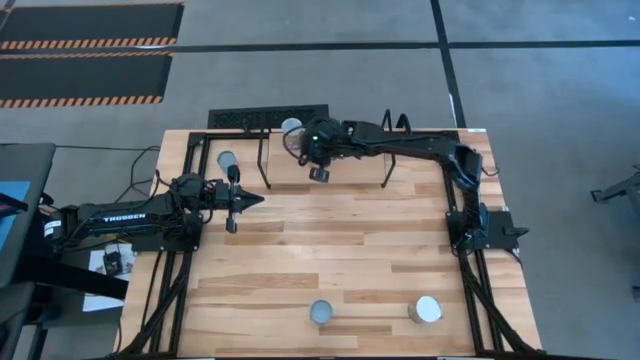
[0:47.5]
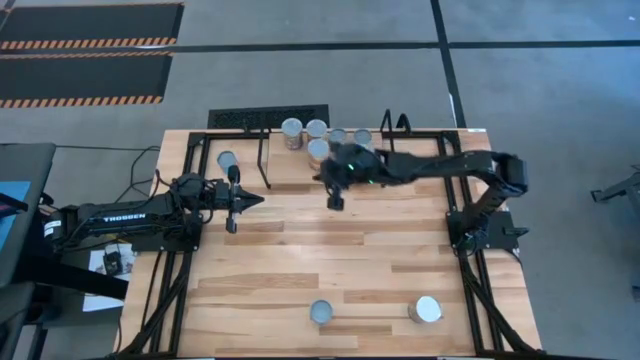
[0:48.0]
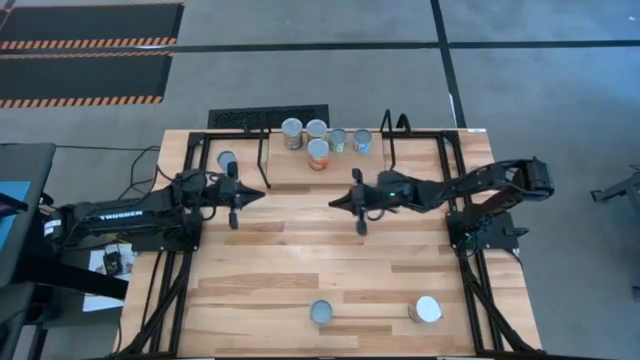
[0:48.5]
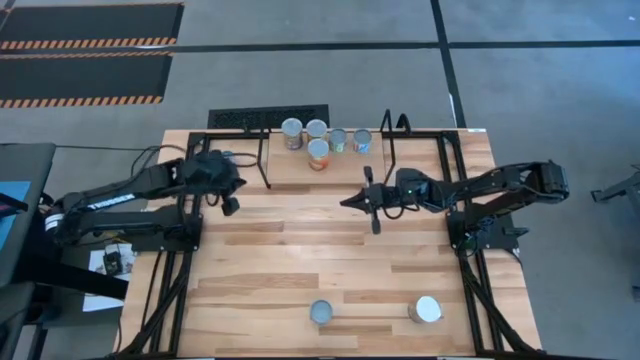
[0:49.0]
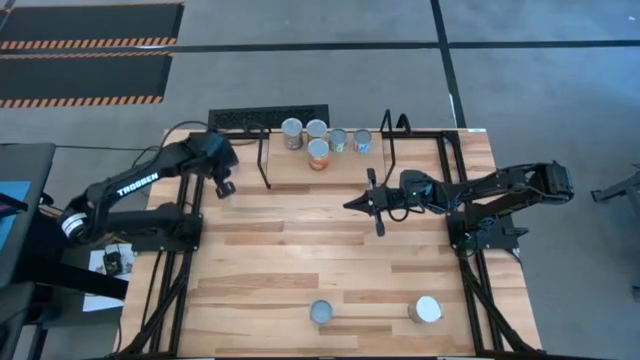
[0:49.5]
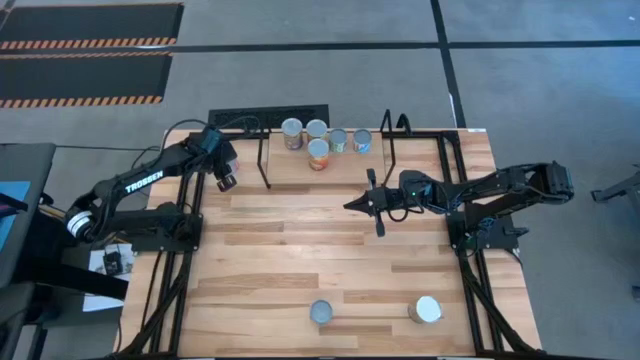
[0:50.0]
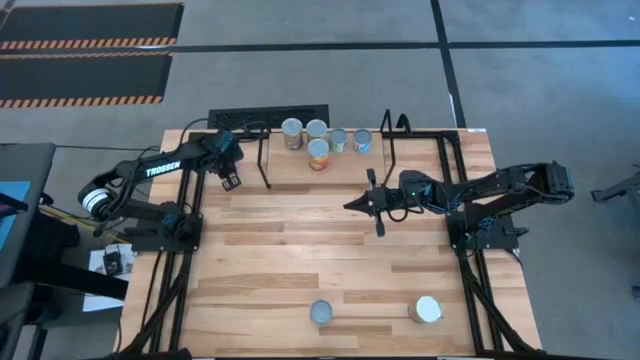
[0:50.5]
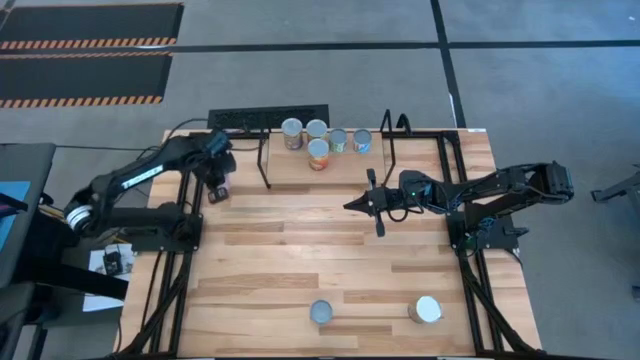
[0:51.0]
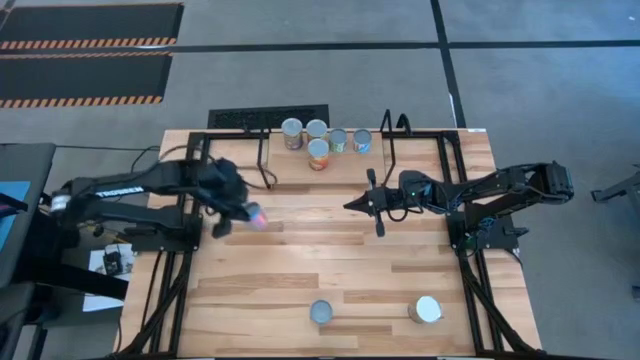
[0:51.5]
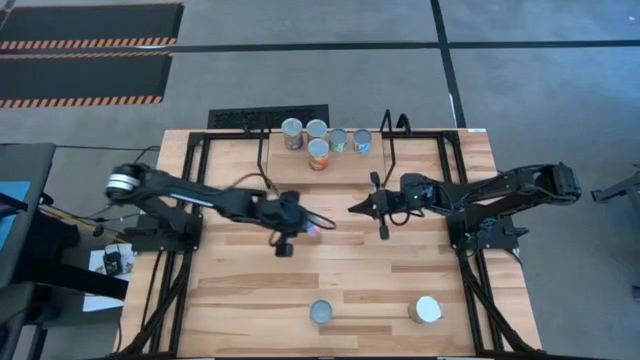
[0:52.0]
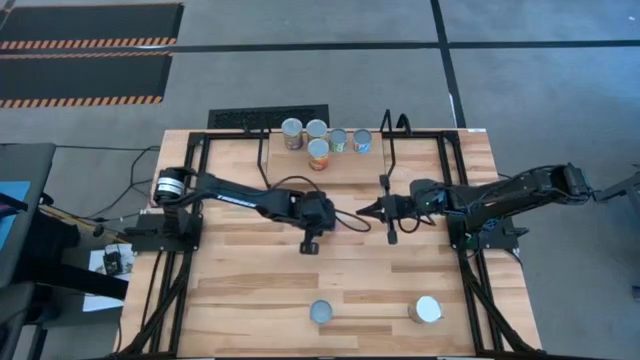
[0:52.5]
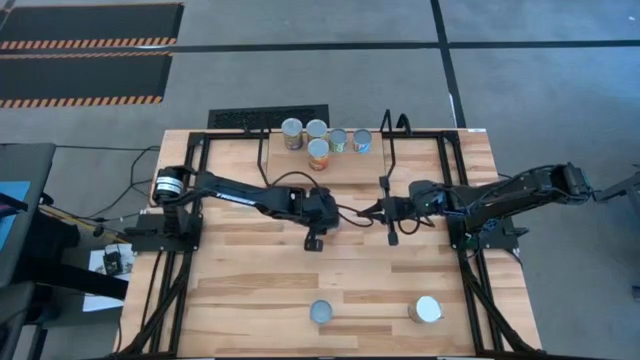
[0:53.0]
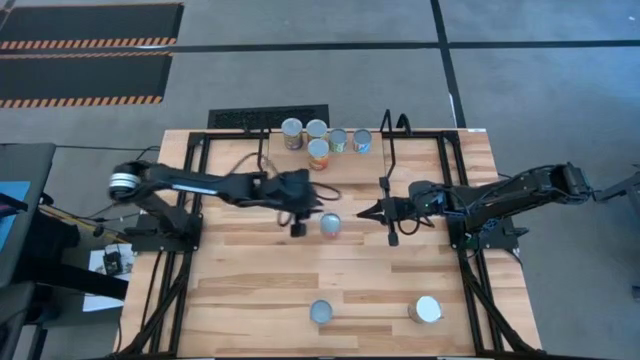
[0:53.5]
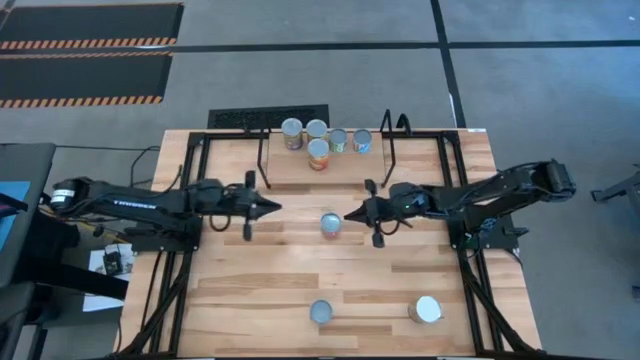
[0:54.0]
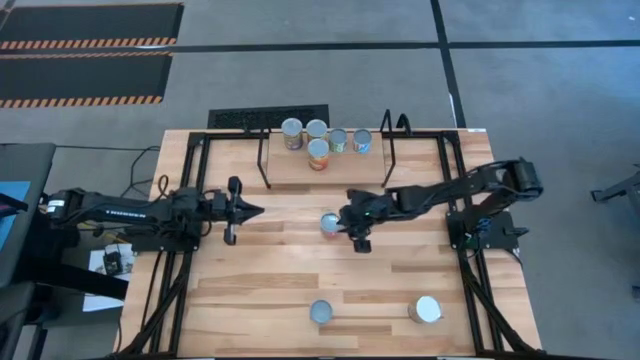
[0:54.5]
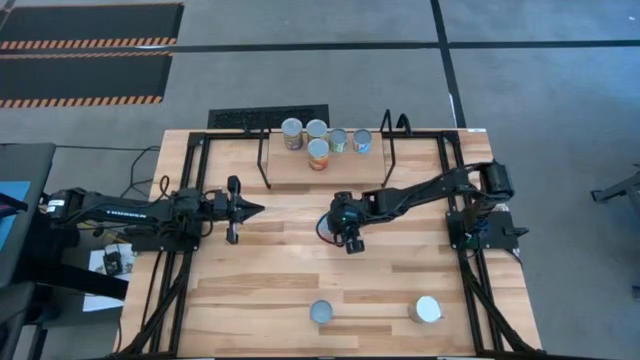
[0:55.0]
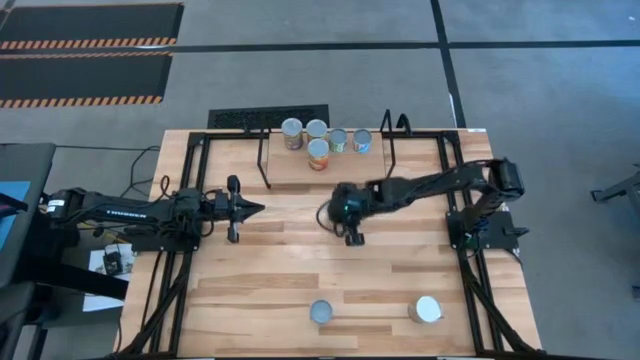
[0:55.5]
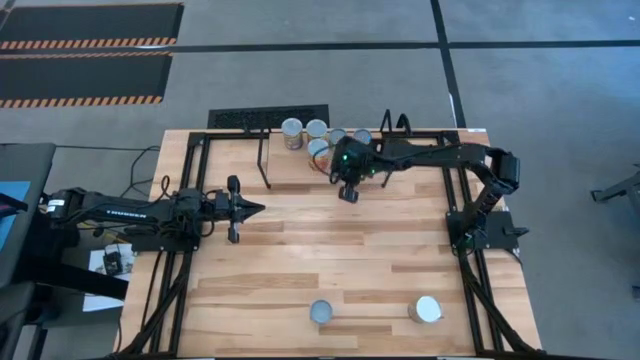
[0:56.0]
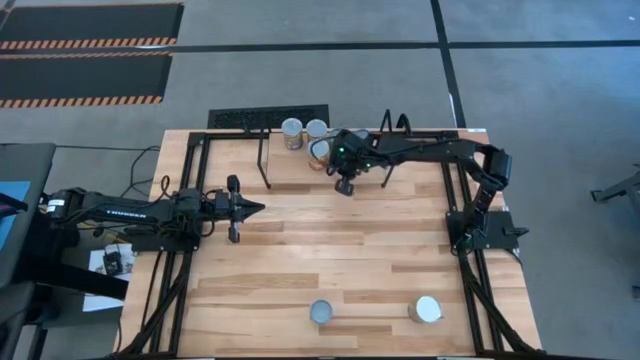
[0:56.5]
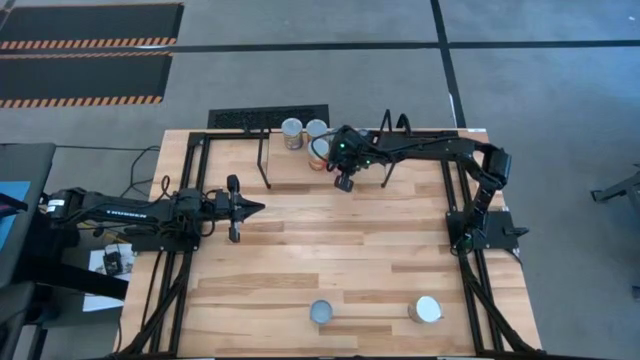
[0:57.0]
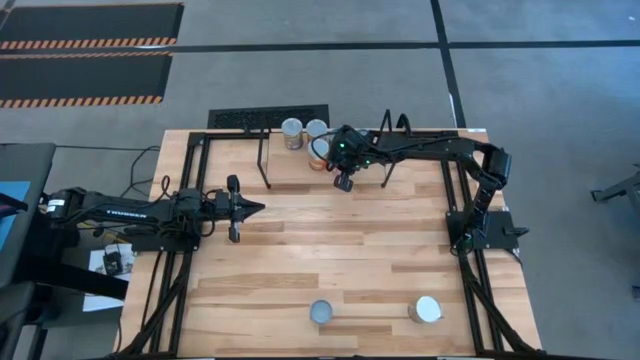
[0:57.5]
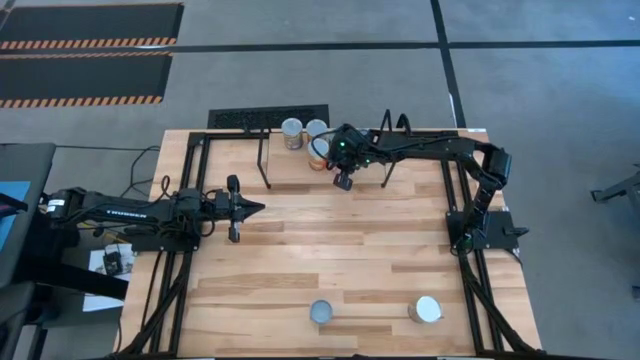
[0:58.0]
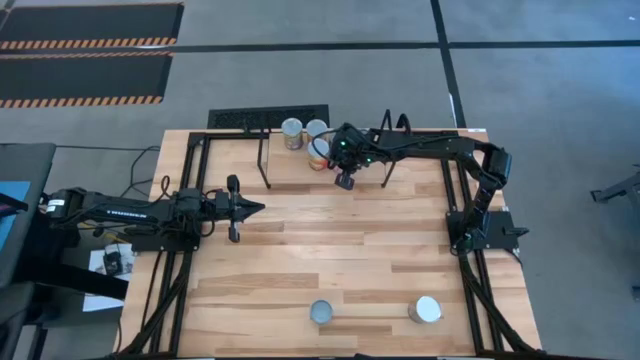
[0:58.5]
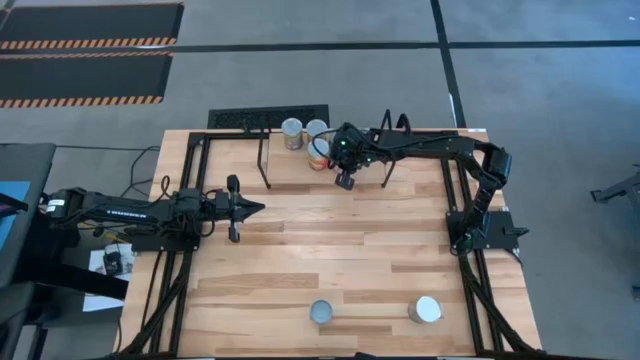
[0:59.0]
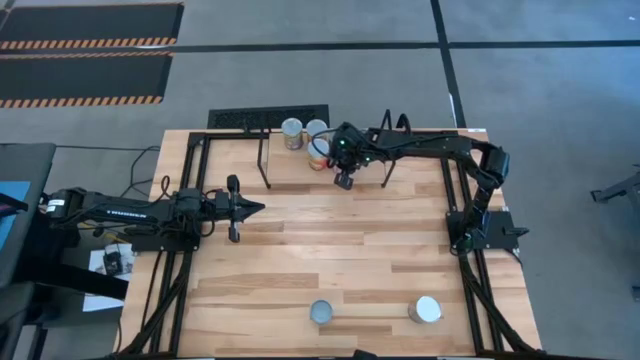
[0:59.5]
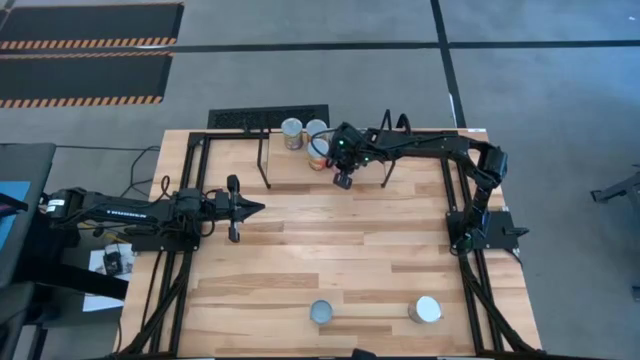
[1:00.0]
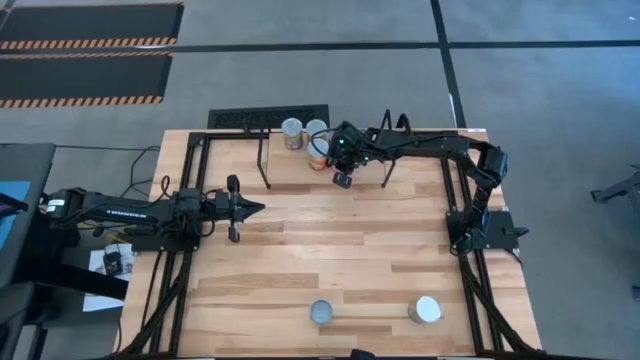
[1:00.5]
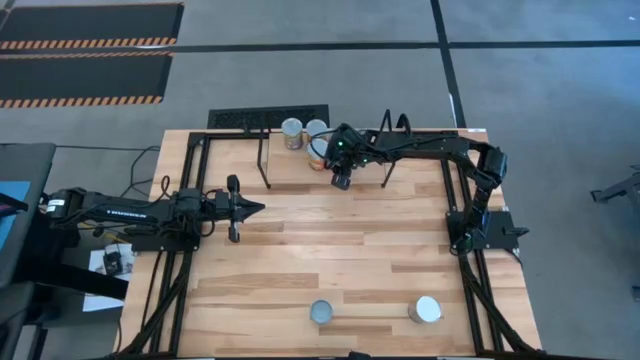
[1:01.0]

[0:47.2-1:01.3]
Task: Pick and place cans onto a shelf
Put the canned mix vegetables on the shelf

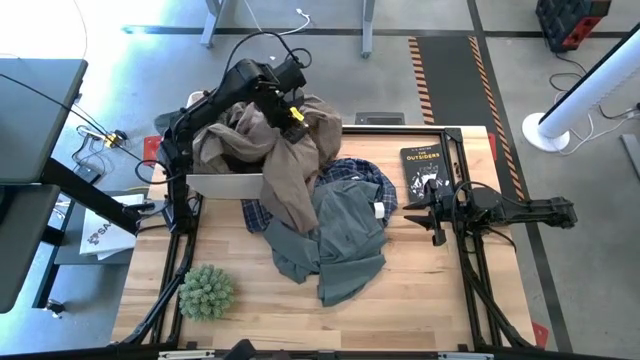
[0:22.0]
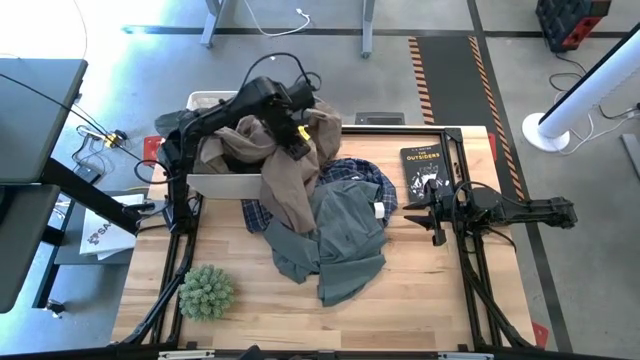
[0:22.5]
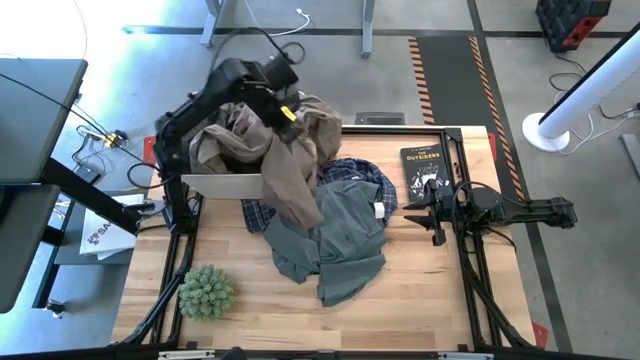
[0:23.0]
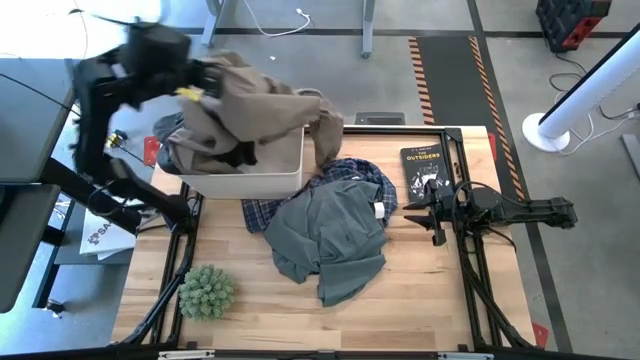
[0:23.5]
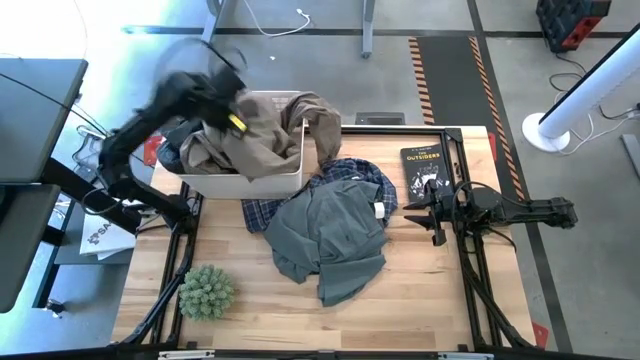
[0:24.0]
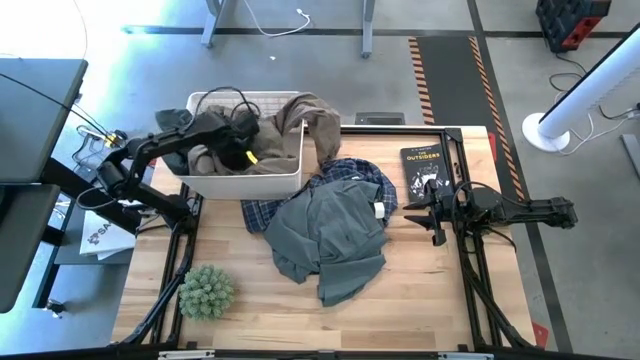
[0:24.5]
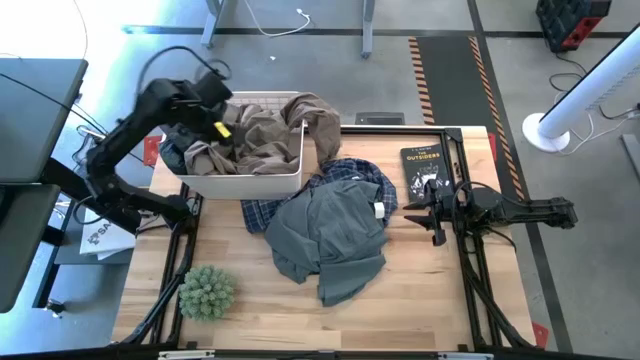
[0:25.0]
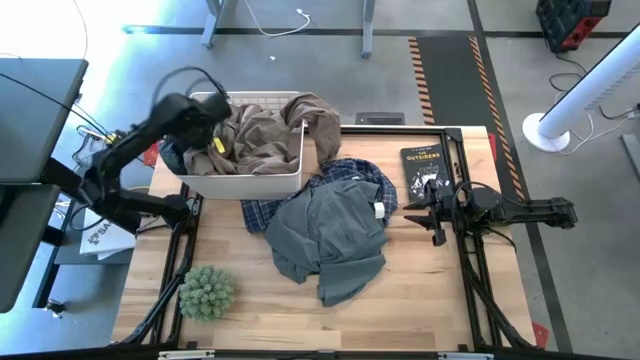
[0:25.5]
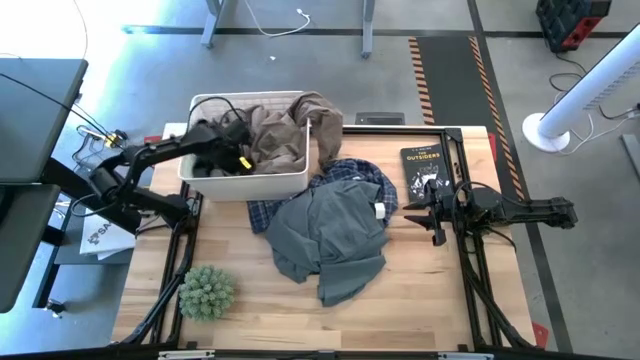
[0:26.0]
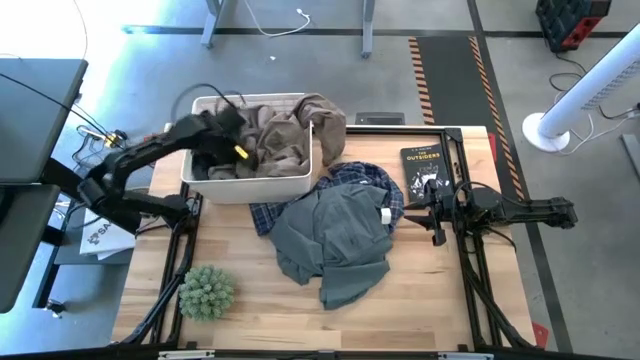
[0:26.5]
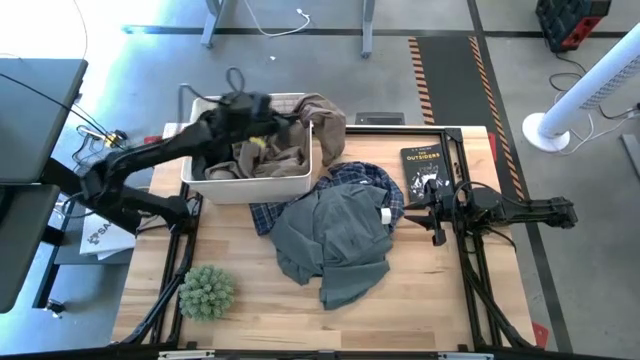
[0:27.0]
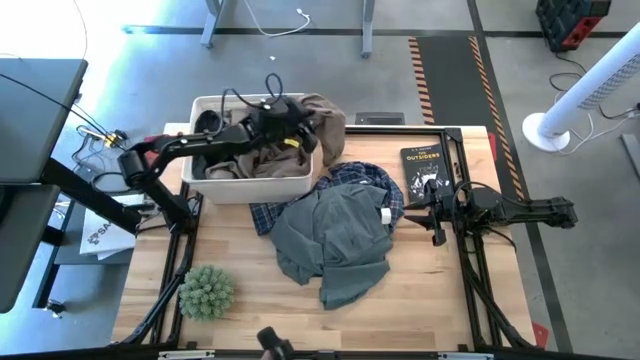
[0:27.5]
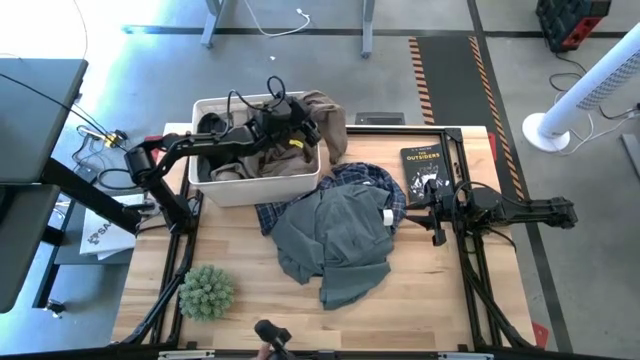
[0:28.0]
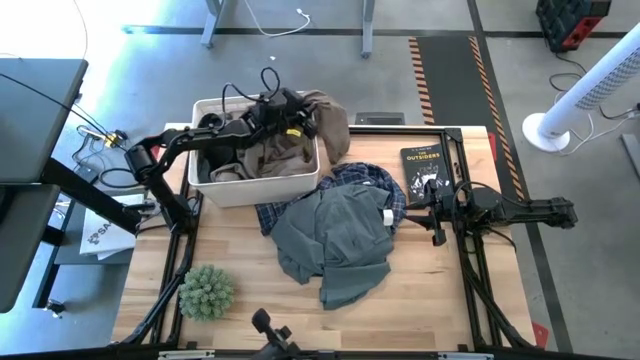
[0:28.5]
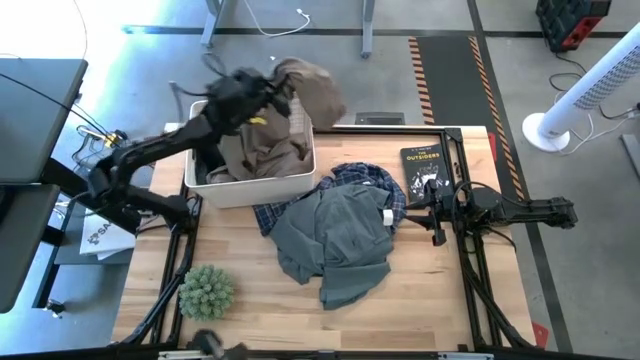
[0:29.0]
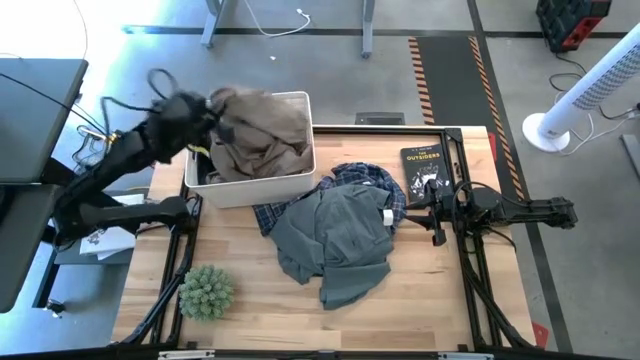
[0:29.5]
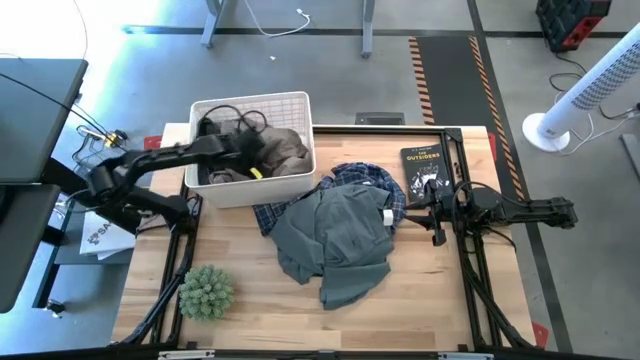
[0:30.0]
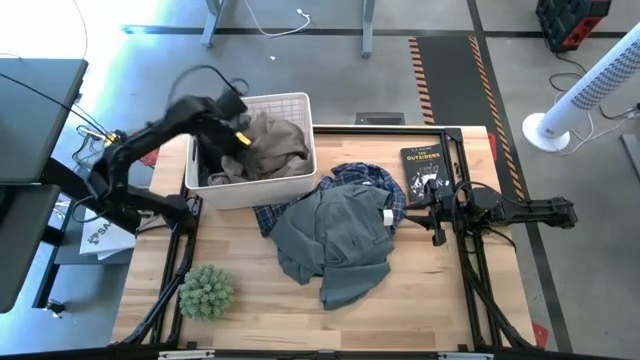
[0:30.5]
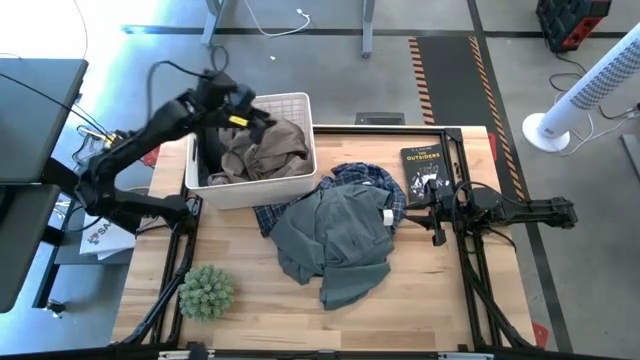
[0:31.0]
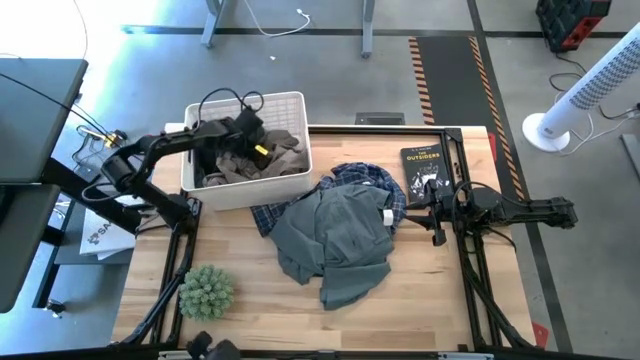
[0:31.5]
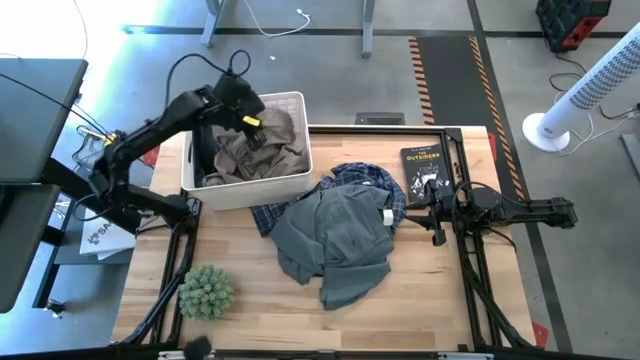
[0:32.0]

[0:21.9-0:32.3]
Task: Sort clothes
Put the brown jacket into the white laundry bin
